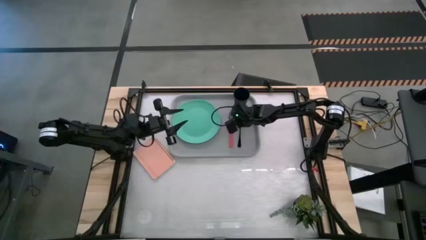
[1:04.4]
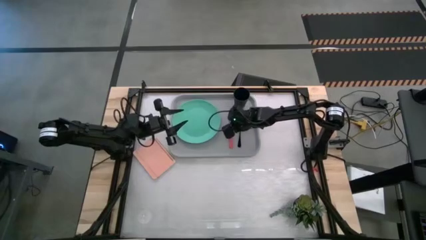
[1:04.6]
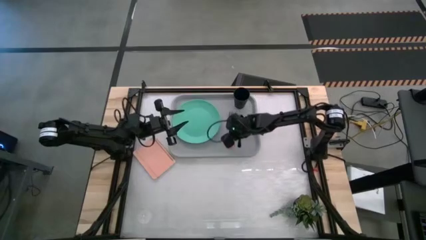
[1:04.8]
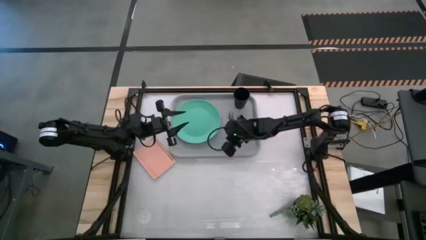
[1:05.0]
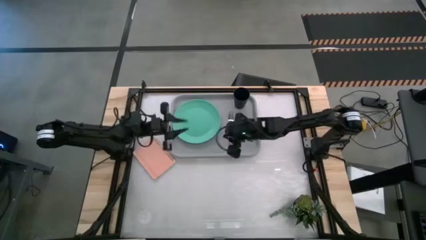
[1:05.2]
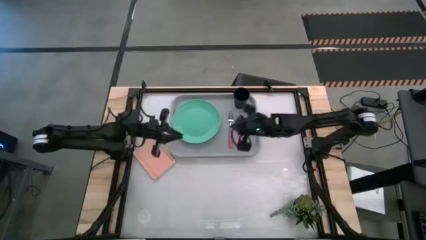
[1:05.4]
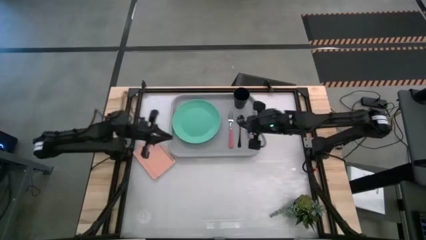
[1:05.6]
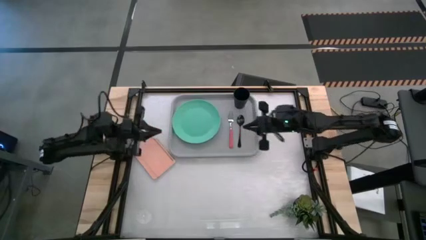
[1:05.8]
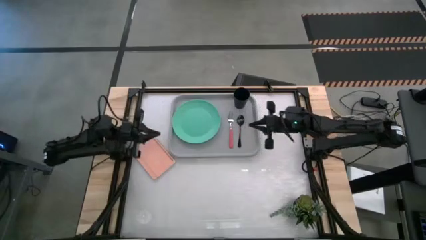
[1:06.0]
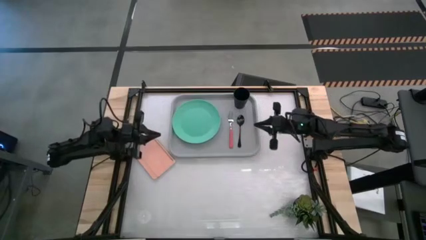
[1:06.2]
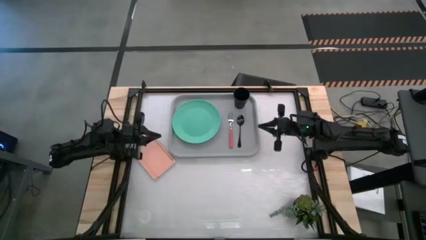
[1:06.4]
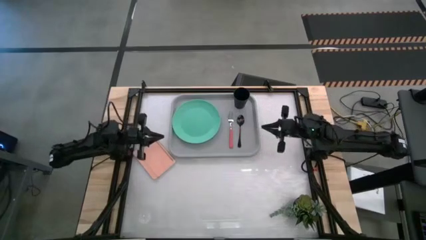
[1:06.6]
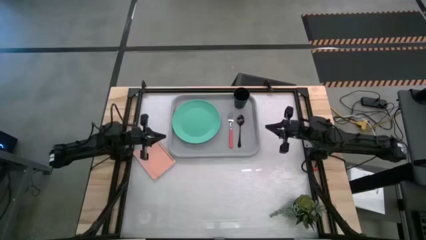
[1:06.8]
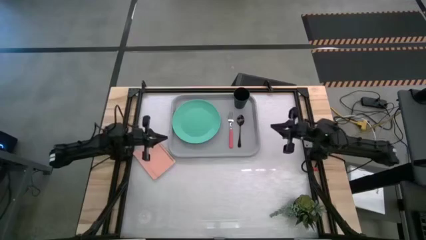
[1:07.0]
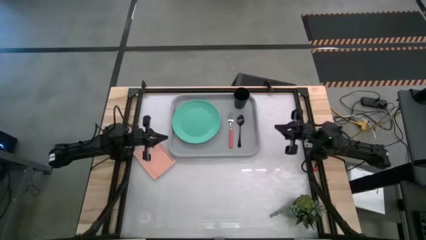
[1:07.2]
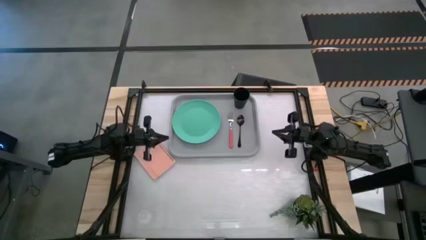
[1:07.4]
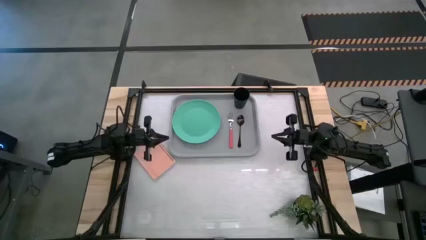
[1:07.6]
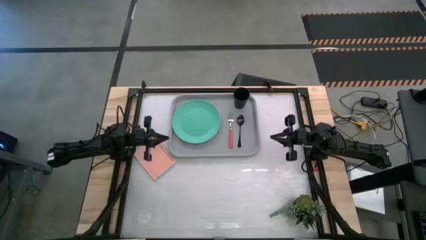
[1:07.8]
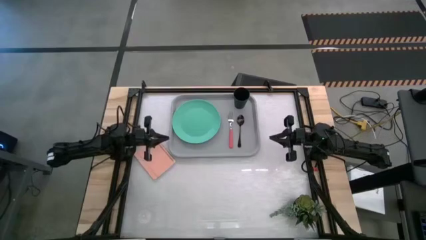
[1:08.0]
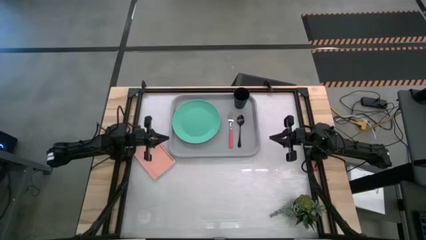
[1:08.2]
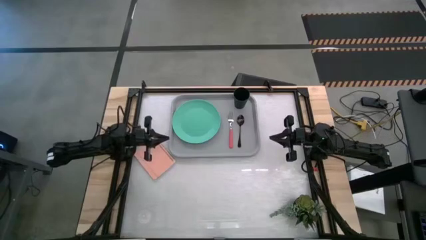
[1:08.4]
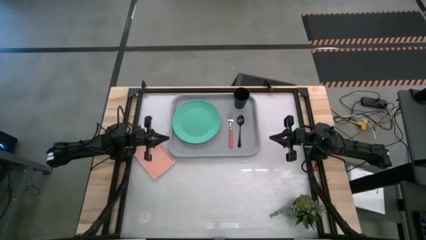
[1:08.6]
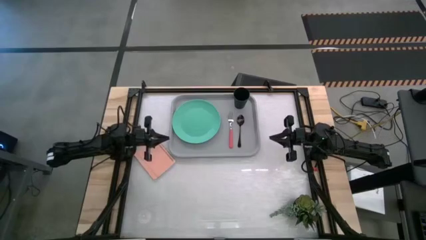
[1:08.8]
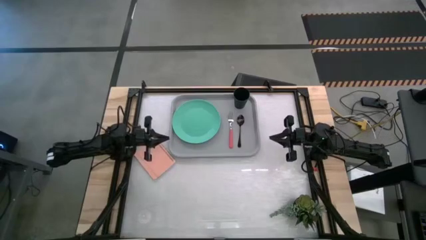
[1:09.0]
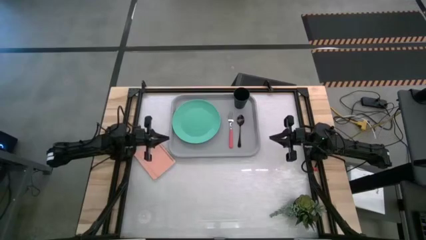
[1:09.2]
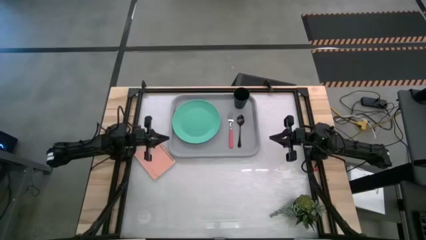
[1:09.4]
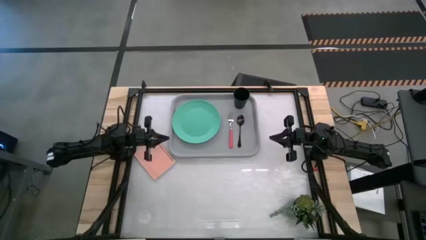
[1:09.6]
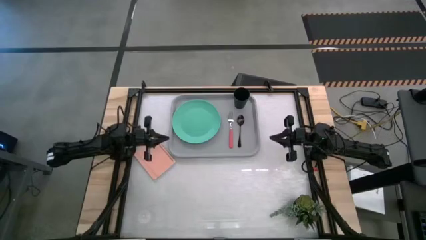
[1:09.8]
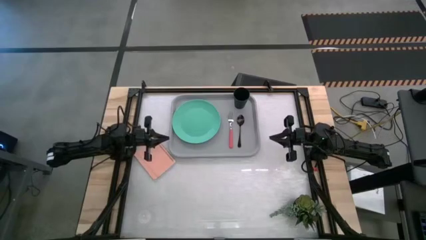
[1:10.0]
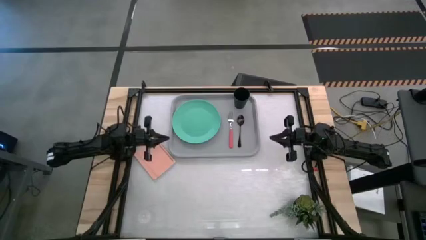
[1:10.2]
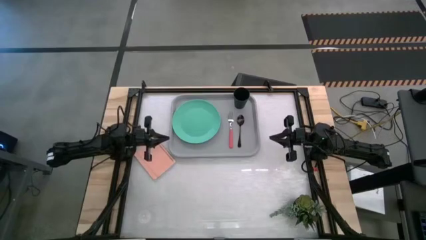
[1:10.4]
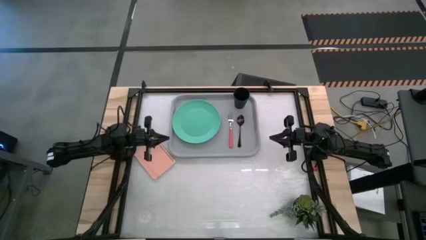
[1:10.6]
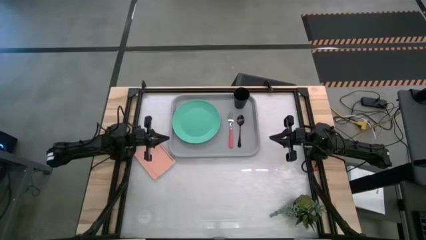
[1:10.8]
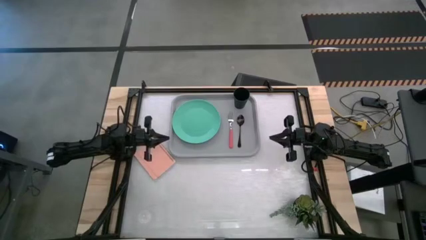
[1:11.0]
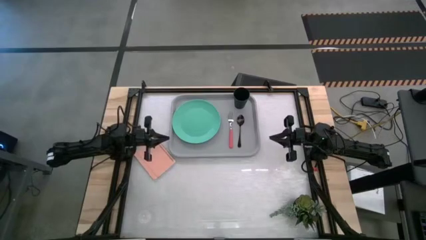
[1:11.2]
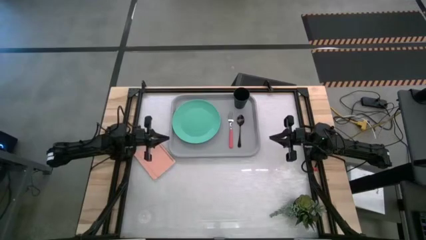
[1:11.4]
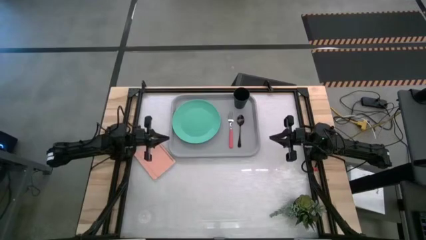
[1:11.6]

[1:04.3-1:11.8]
Task: Pick and place plate/cup/fork/spoon on tray
Return to Home Position

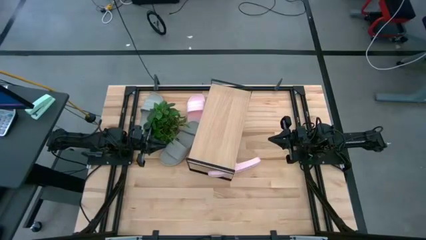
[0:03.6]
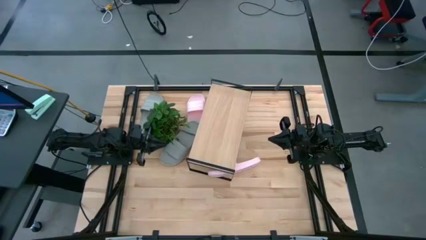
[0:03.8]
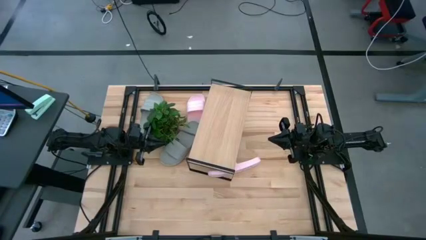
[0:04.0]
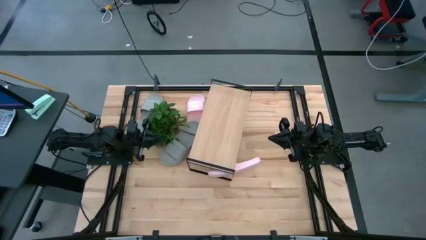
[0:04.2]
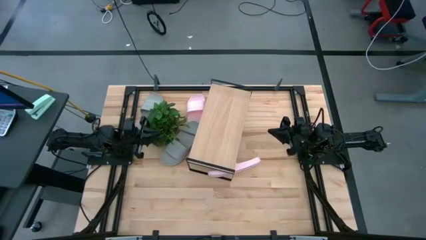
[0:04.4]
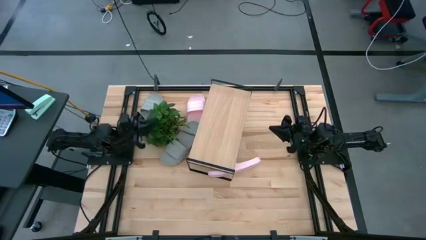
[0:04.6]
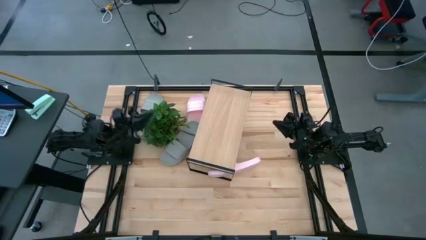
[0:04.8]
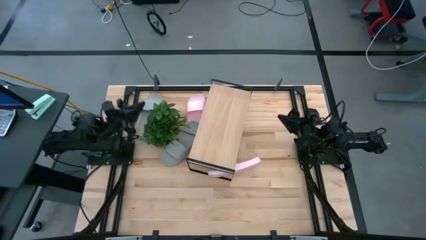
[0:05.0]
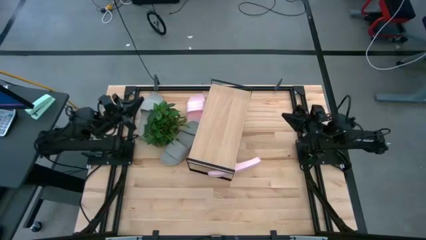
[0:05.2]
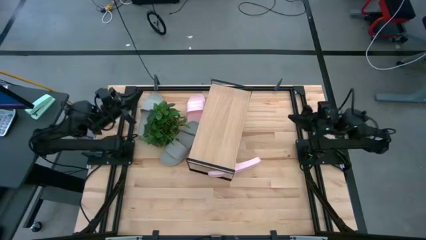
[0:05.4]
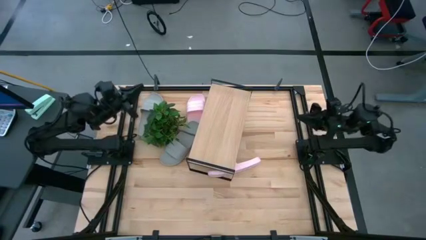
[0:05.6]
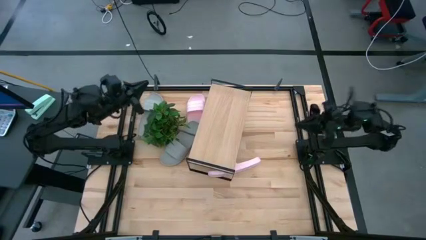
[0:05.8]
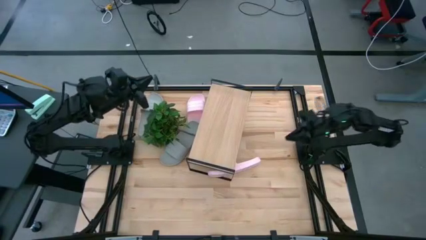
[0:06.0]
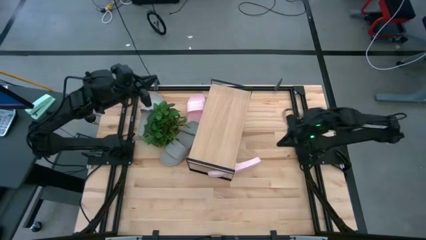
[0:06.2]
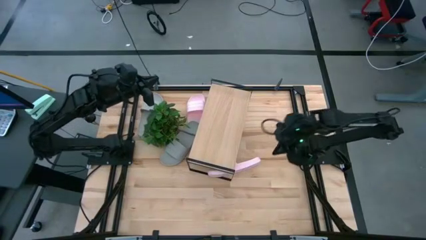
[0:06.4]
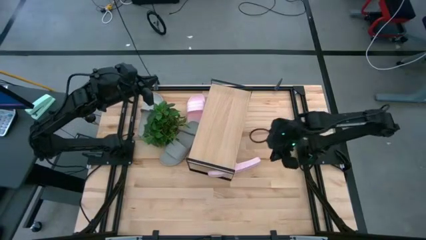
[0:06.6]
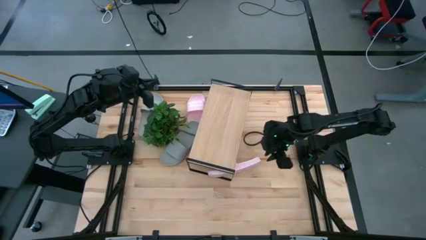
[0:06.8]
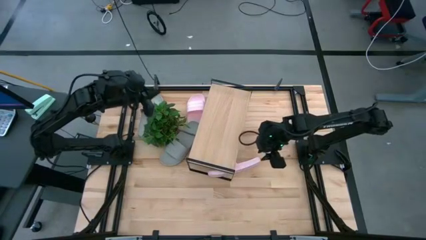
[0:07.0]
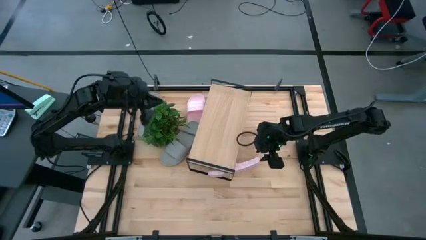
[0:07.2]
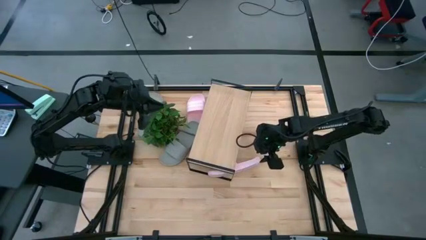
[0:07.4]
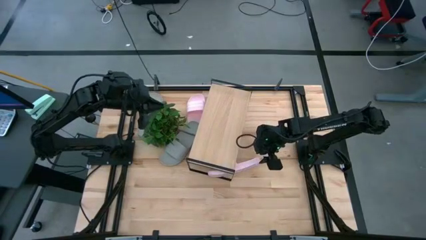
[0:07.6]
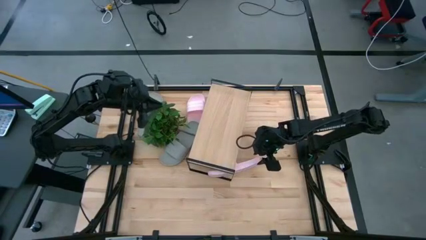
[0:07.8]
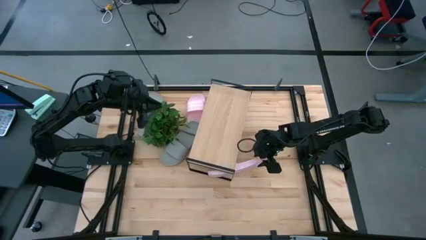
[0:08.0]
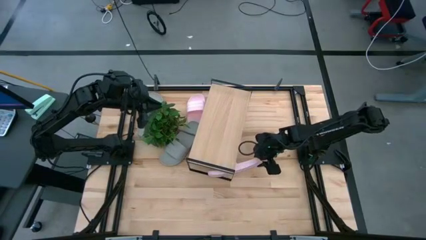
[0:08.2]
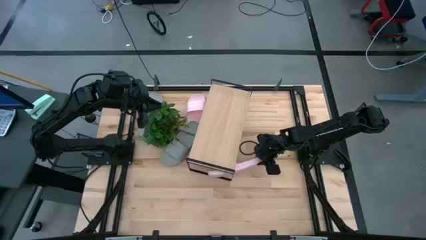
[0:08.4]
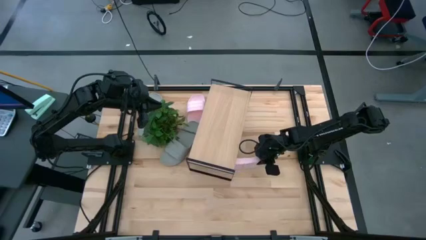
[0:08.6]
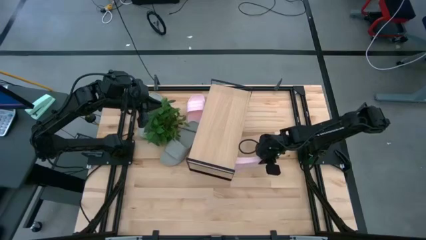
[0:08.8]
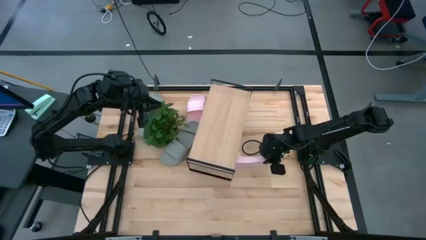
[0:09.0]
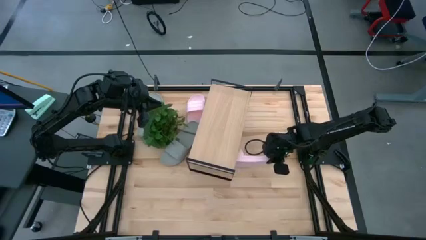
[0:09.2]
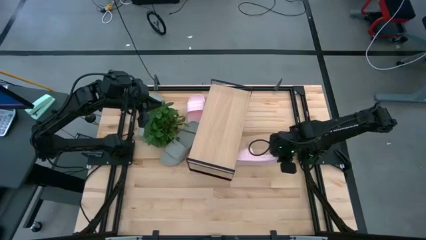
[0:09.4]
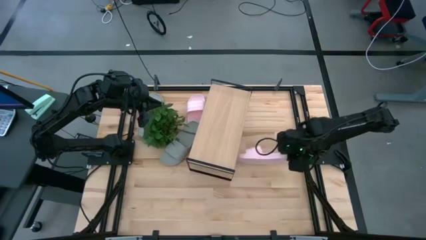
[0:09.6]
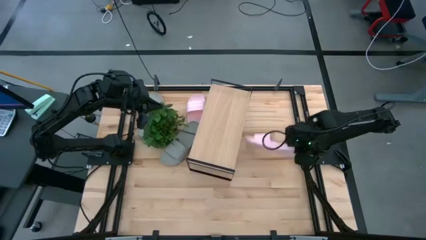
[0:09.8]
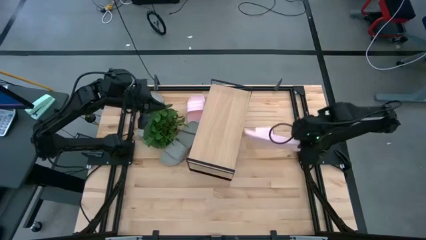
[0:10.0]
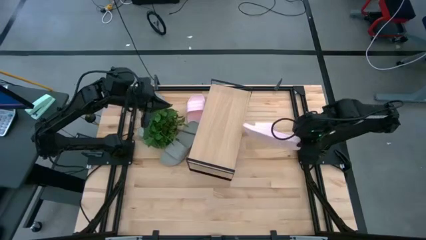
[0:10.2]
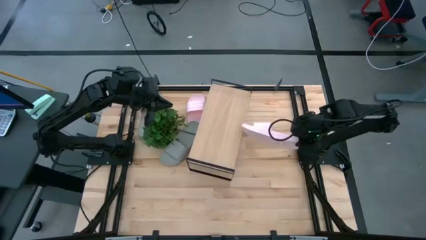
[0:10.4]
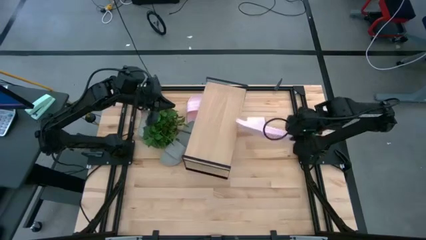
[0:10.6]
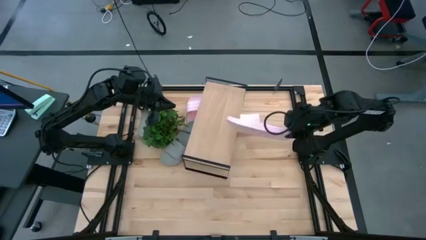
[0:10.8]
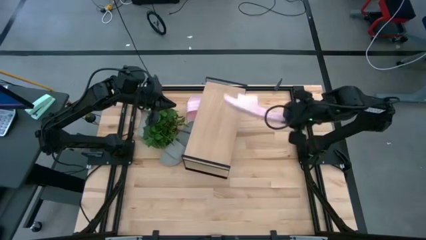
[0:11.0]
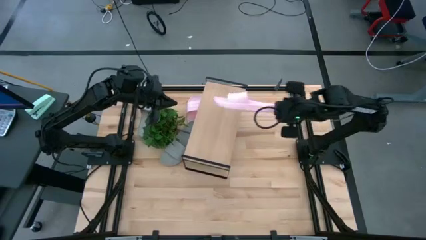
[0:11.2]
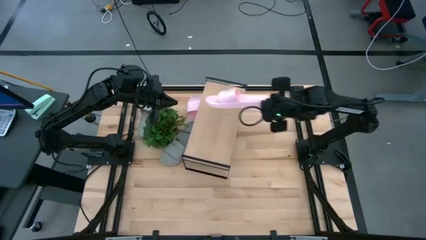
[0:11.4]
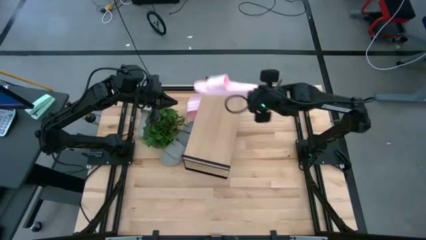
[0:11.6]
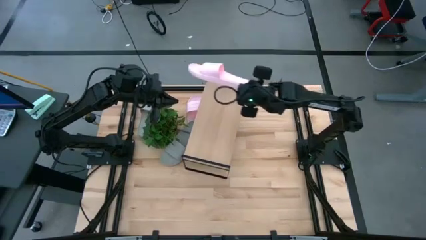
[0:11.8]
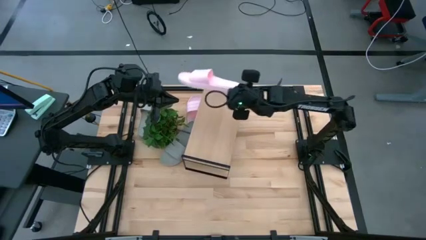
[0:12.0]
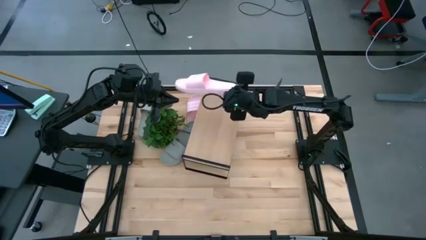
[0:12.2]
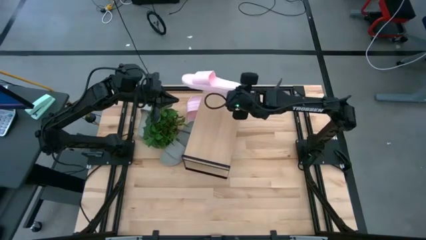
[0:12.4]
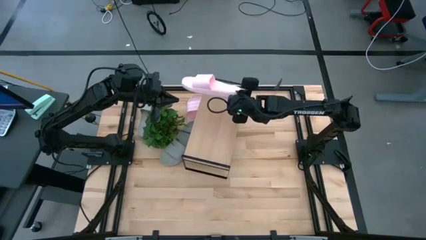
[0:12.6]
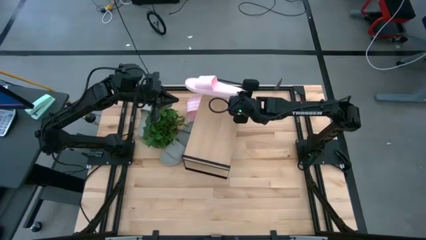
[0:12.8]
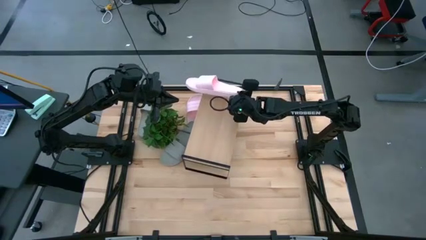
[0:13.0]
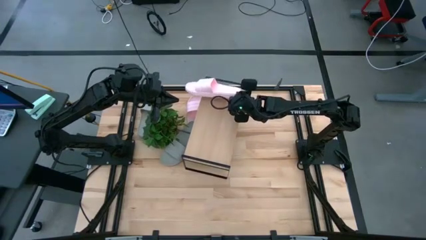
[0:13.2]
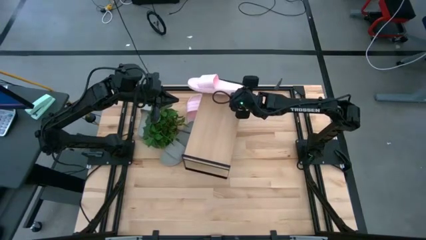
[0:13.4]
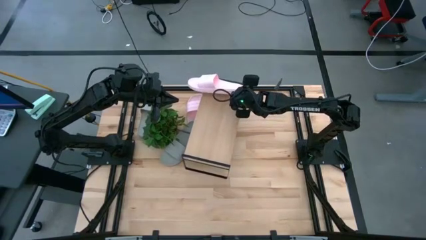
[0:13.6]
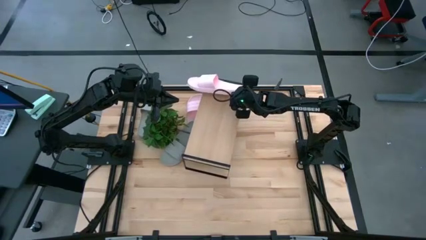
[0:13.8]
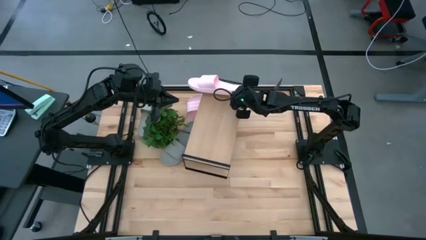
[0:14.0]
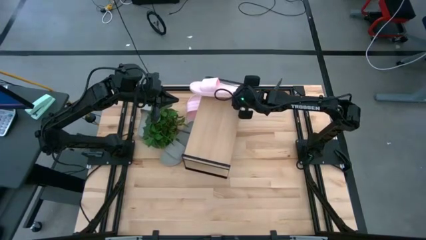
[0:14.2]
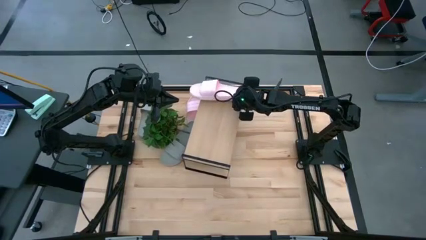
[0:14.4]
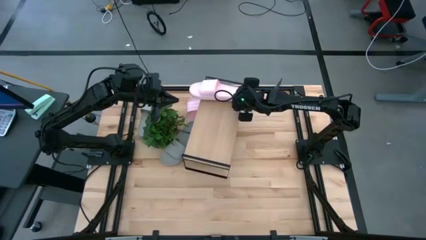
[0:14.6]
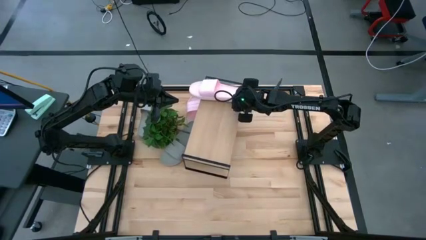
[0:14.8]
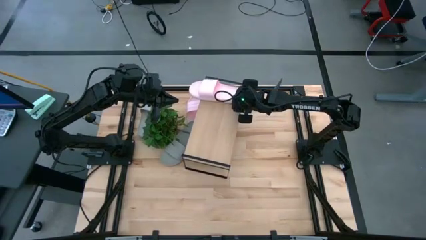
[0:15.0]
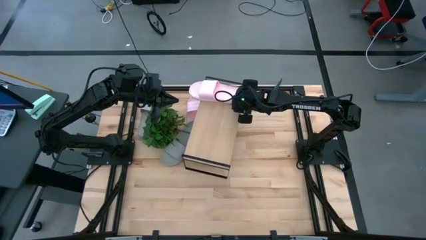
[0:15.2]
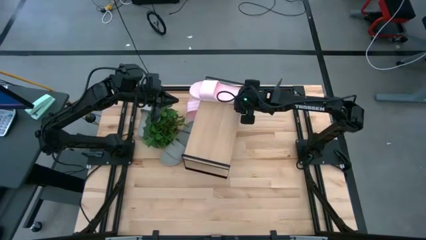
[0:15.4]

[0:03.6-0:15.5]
Task: Pick and place slides into the shelf
Put the bottom pink slide on the shelf
